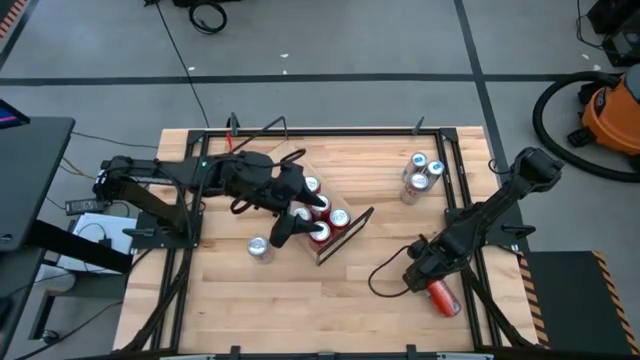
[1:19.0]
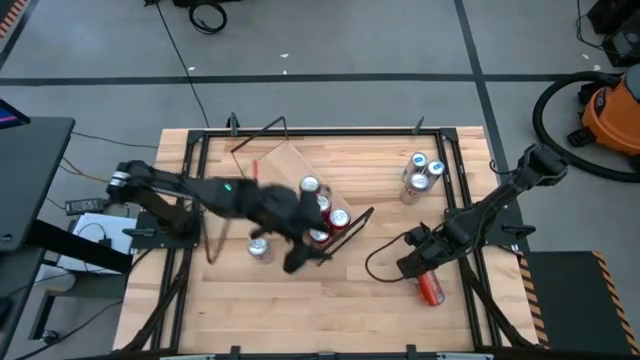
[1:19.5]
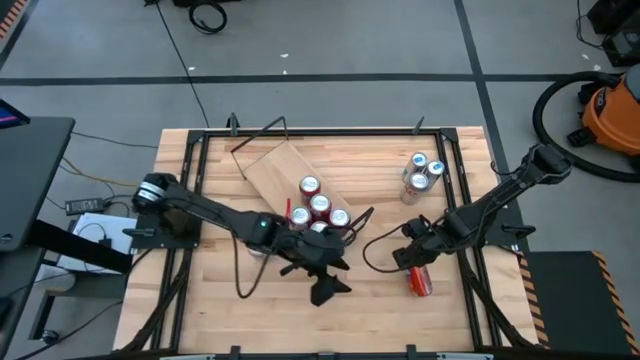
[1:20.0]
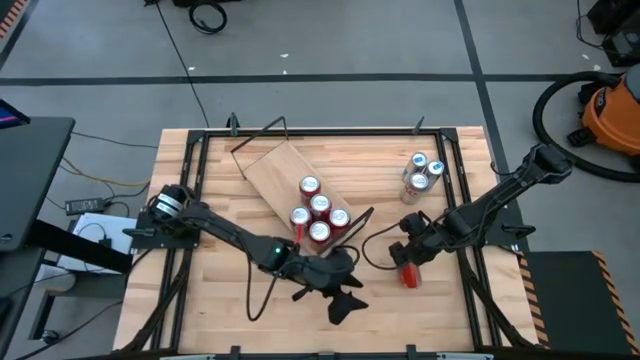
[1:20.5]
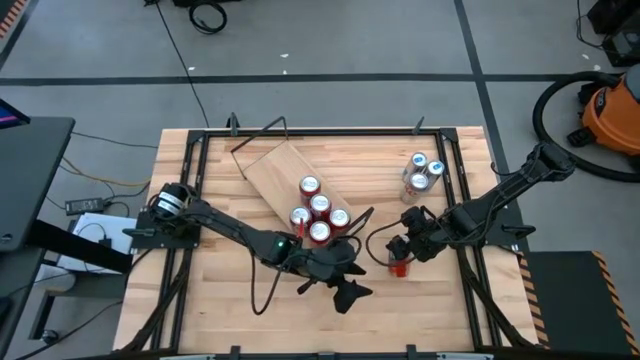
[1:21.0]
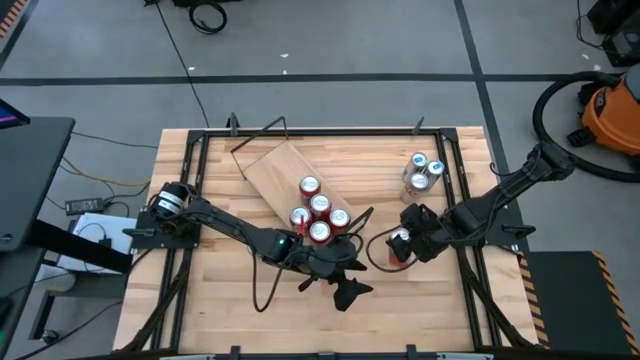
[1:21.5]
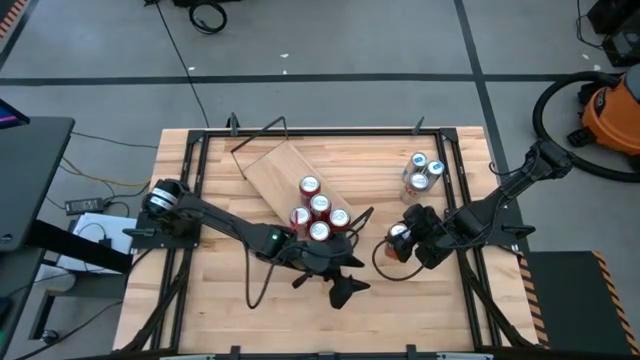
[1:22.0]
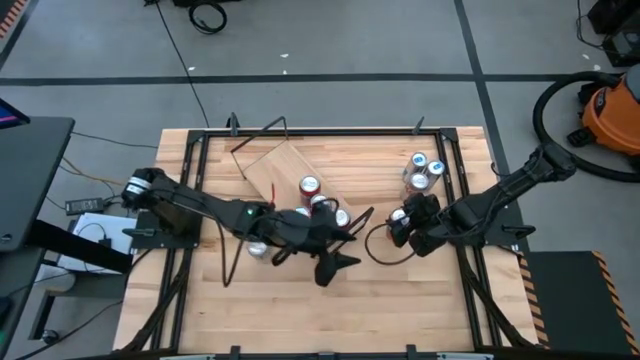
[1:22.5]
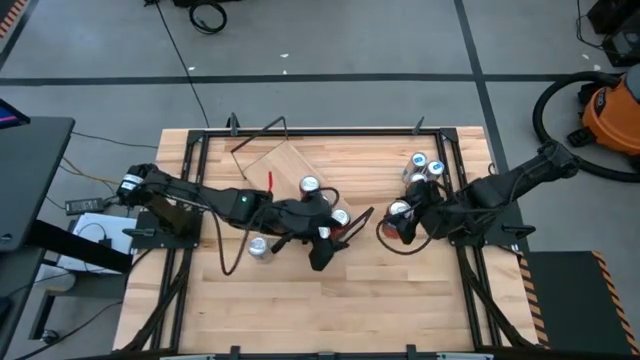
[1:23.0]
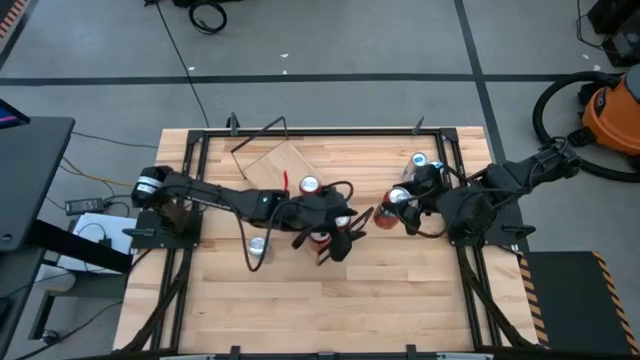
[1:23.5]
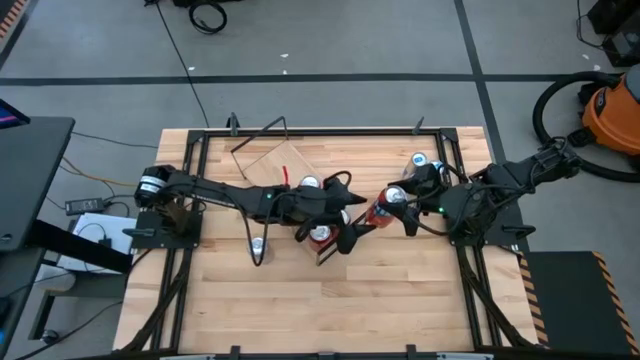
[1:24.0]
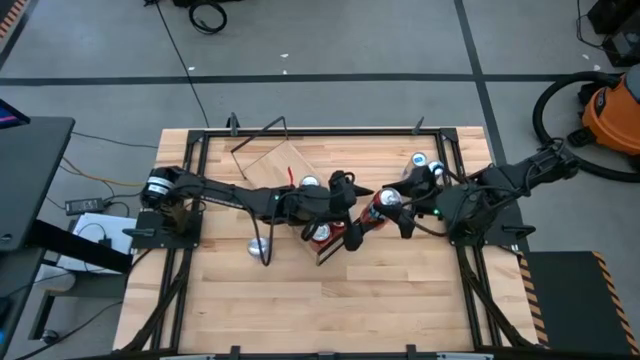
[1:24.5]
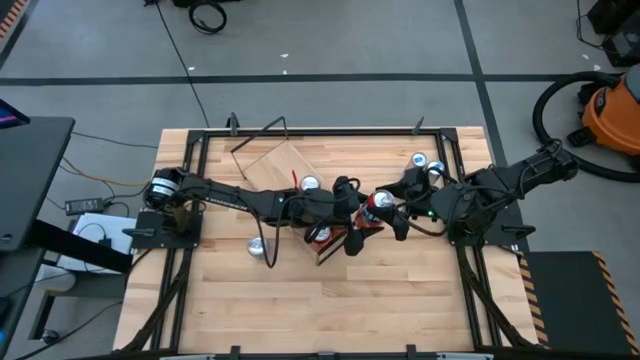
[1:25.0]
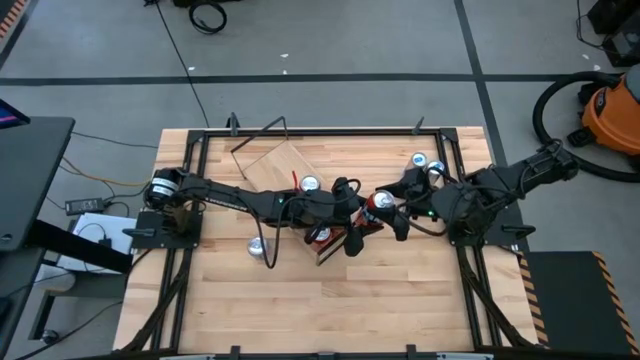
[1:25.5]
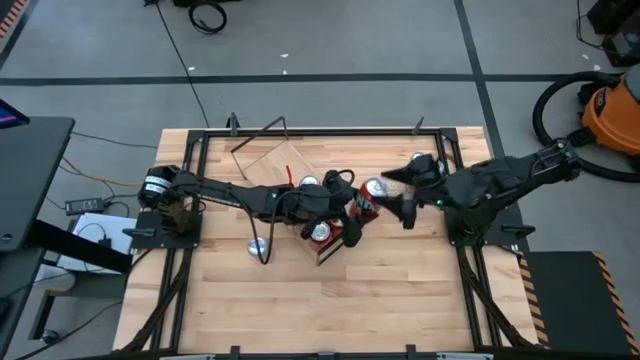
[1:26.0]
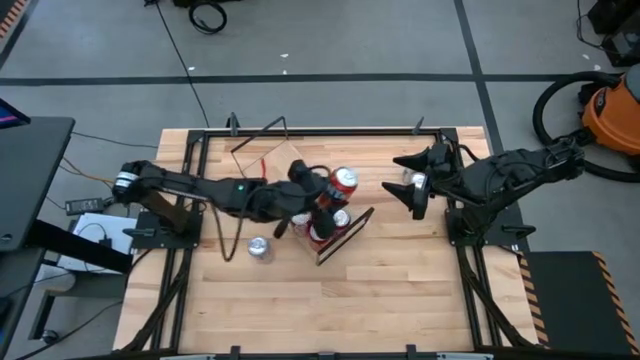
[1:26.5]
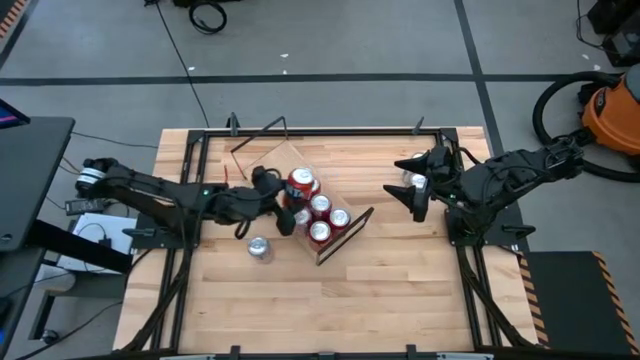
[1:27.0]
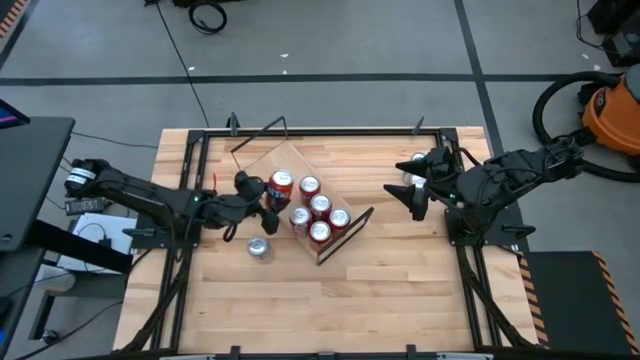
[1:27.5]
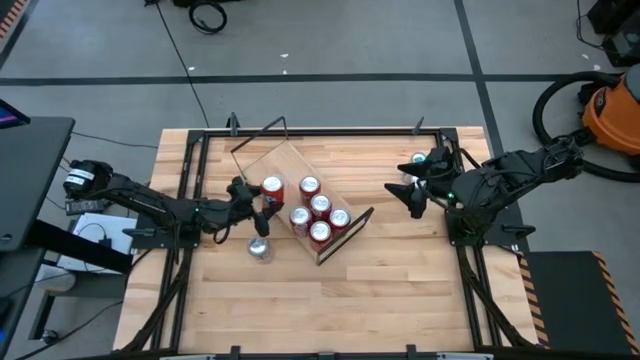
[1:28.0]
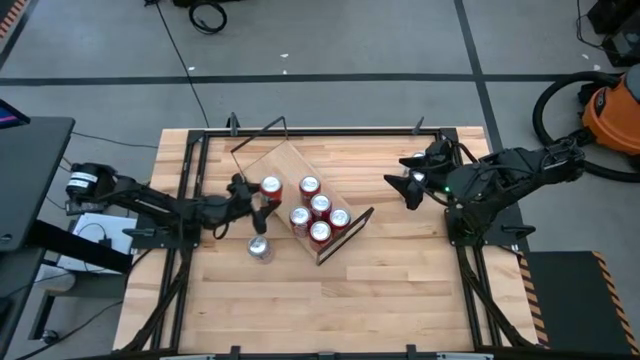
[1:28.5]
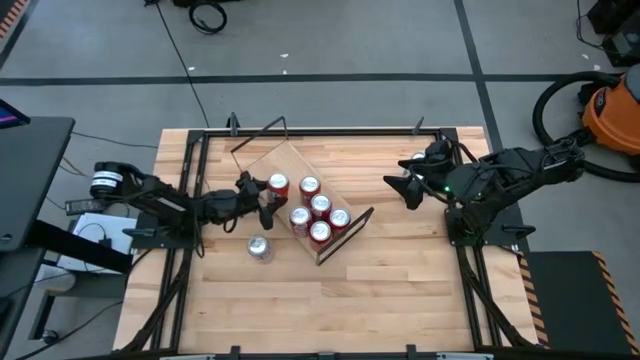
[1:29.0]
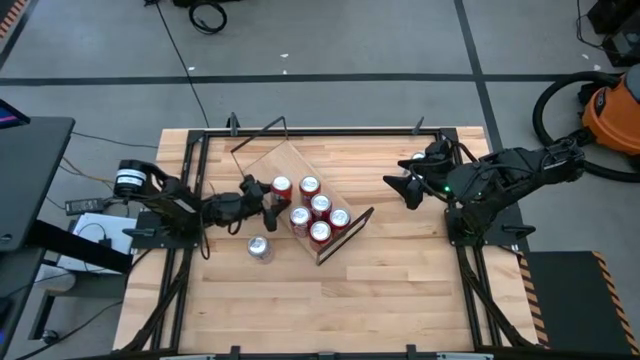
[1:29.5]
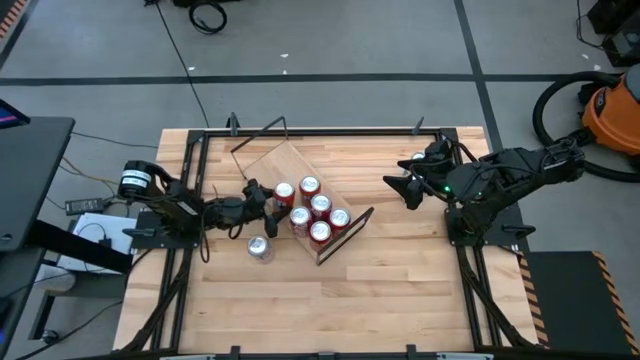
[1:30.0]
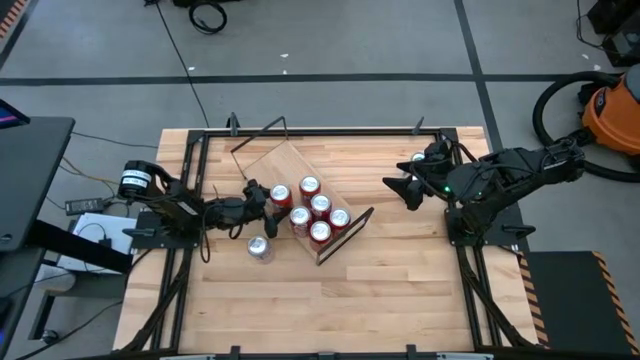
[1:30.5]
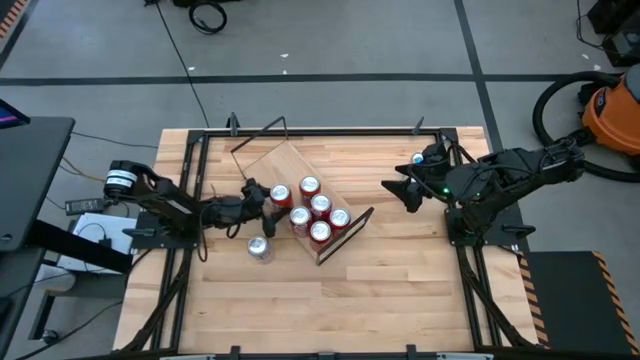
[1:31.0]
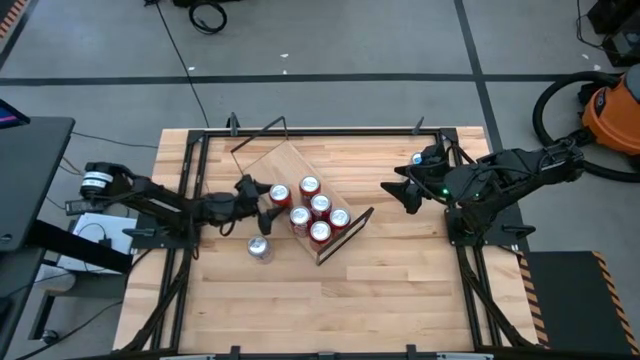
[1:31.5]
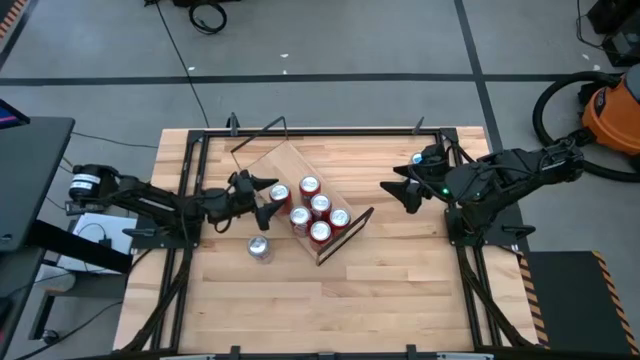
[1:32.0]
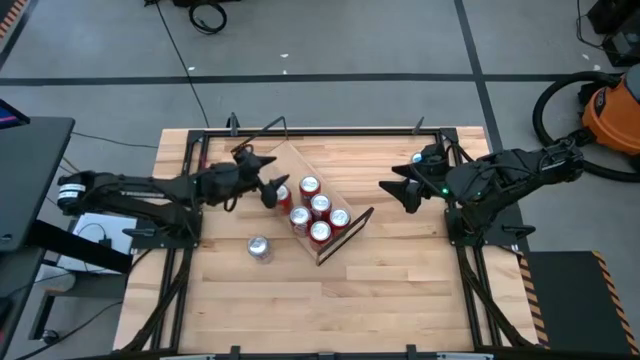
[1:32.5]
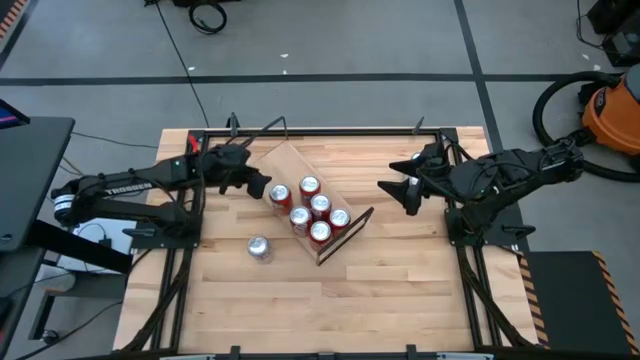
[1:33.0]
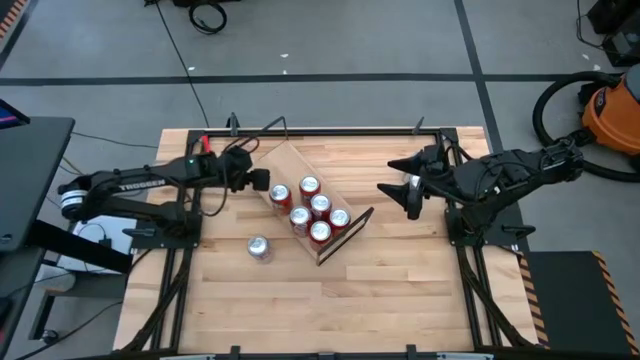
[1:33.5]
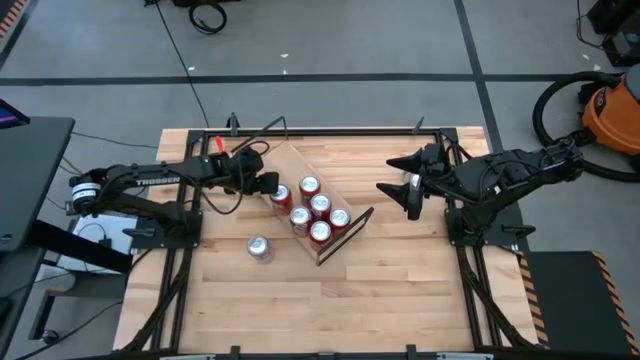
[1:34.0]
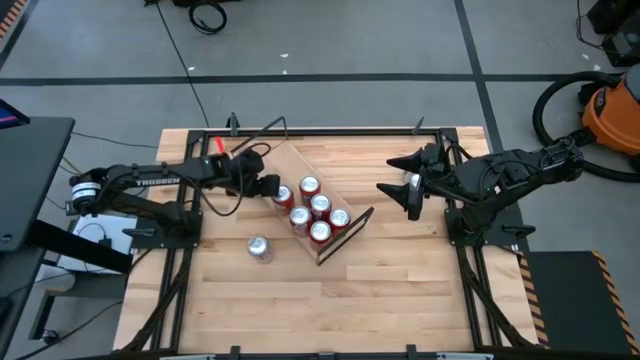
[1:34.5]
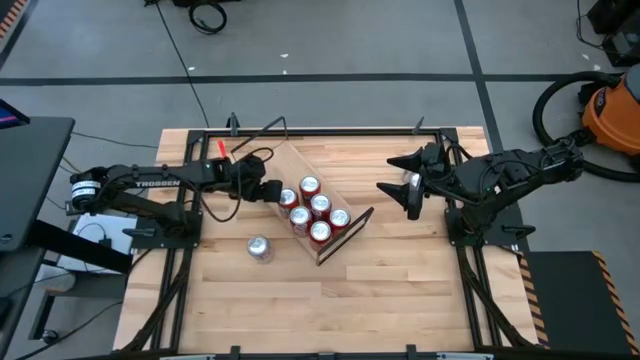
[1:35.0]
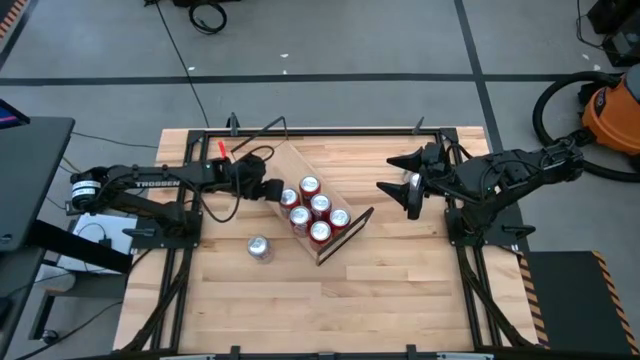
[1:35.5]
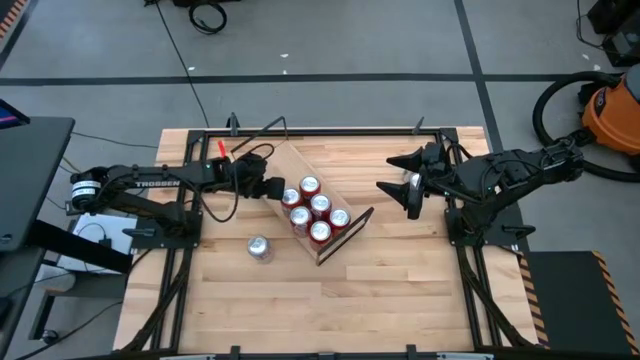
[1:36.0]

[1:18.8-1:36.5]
Task: Place canned beverage on shelf
Put the orange soda can on the shelf aligned with the other orange soda can

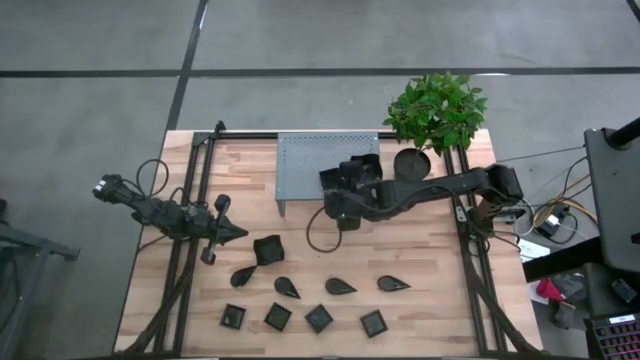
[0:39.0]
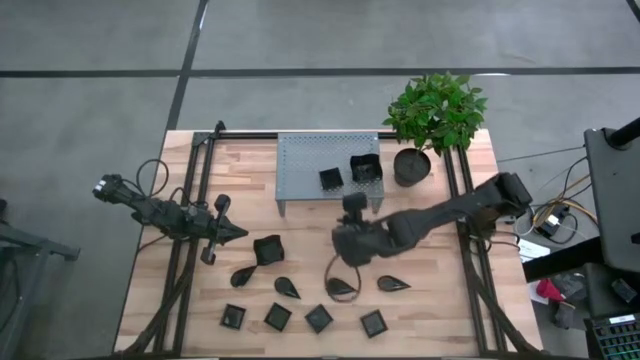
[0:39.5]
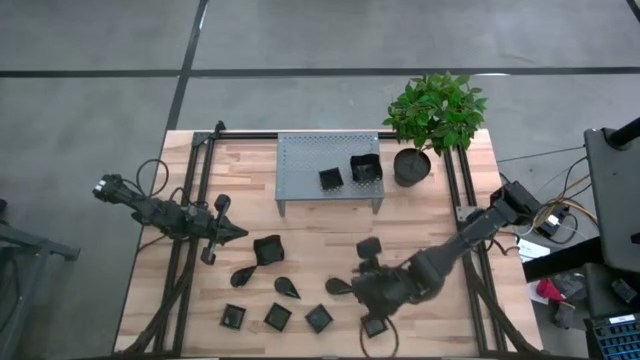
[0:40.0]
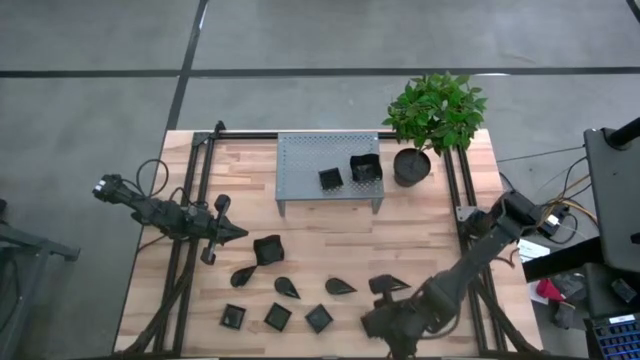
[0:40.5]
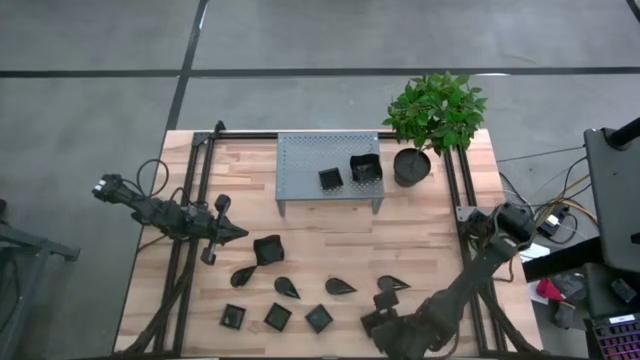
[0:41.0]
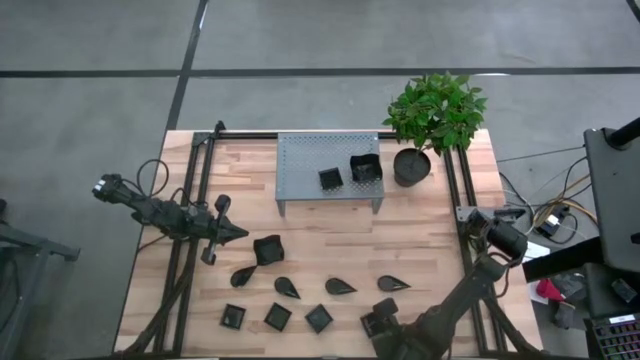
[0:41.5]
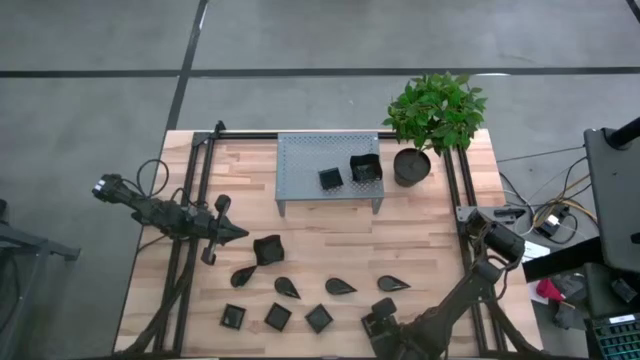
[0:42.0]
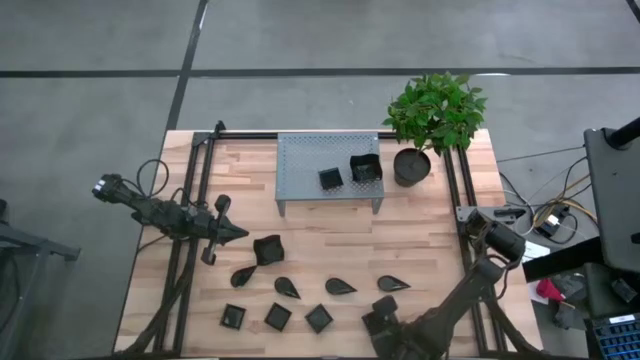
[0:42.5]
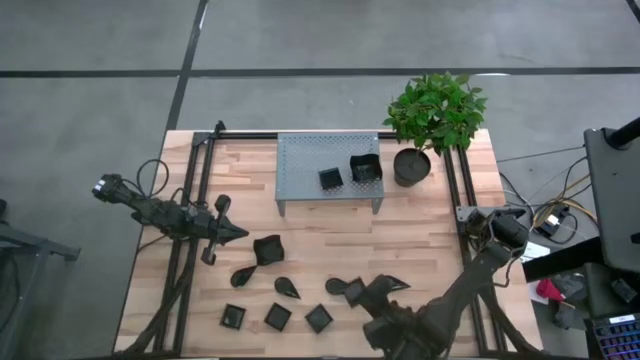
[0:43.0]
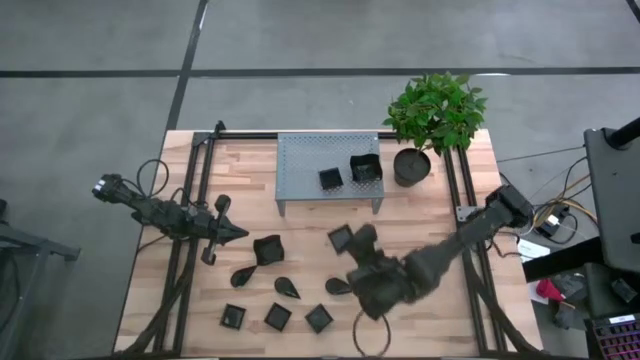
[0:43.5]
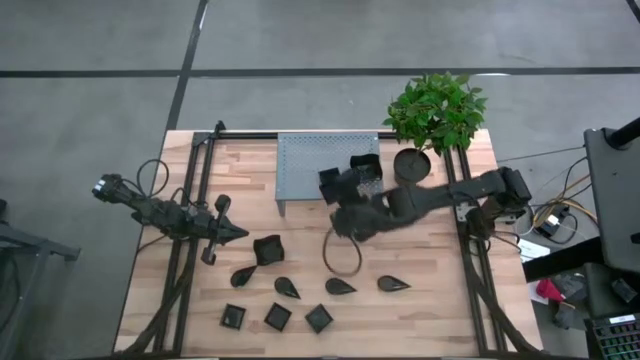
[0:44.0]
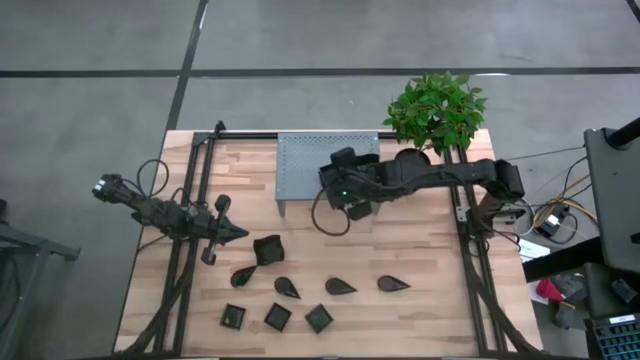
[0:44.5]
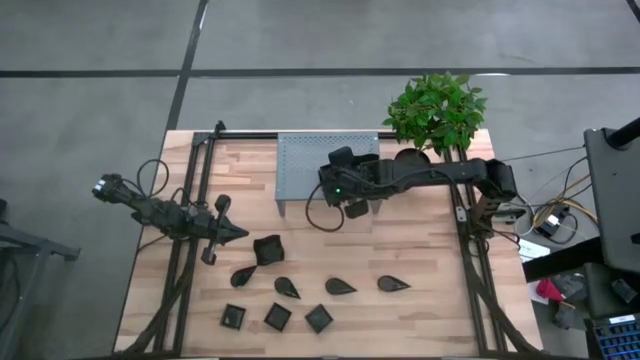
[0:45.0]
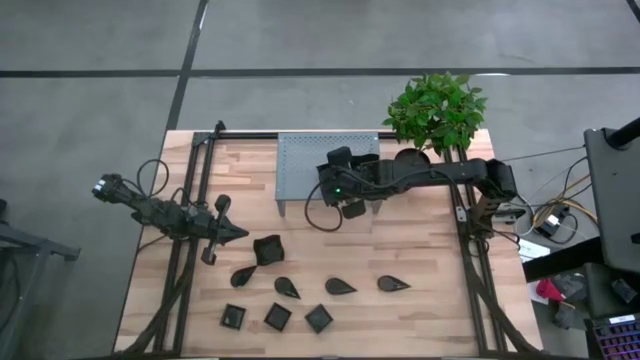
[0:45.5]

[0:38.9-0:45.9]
Task: Pick & Place Mini shaped plates
Stack the black square plate on top of the black square plate on the shelf
